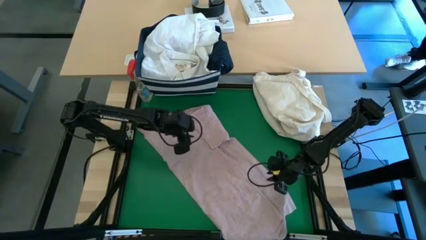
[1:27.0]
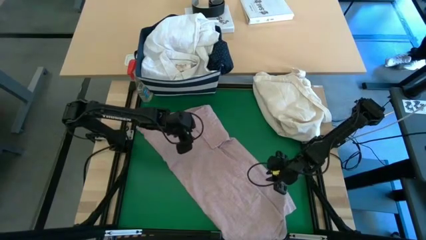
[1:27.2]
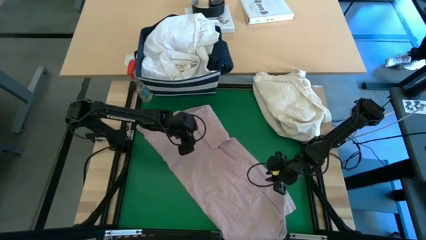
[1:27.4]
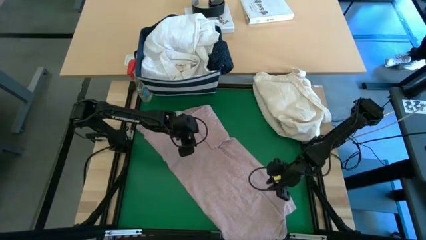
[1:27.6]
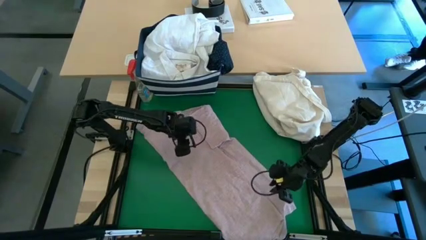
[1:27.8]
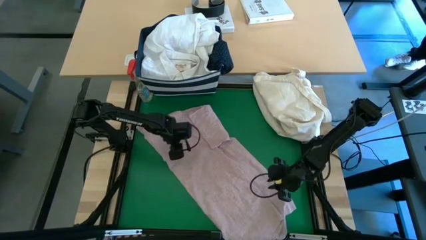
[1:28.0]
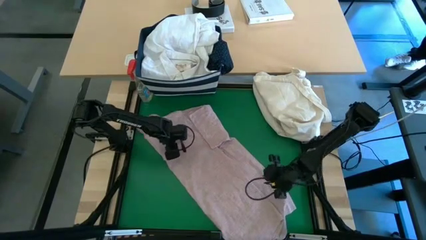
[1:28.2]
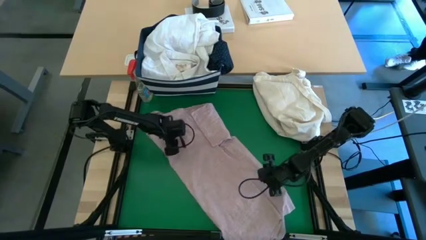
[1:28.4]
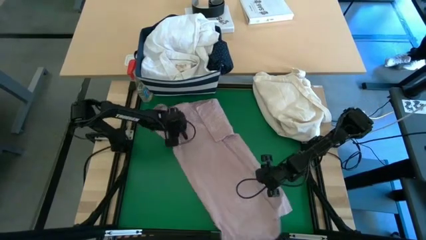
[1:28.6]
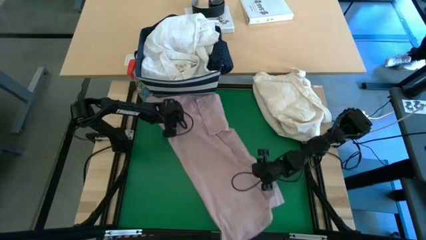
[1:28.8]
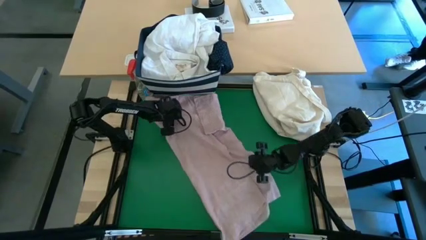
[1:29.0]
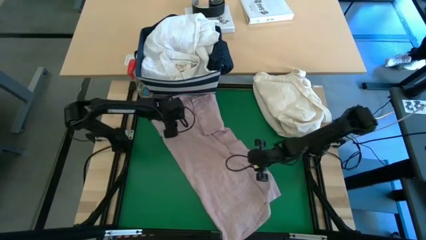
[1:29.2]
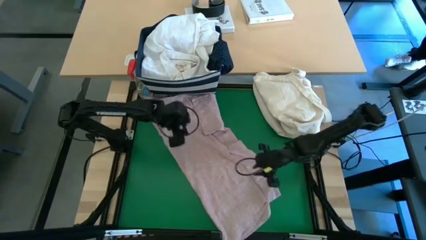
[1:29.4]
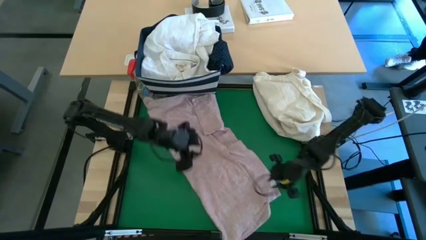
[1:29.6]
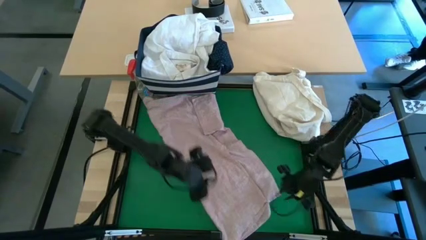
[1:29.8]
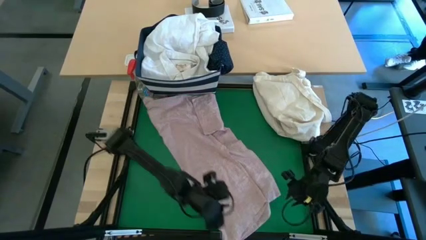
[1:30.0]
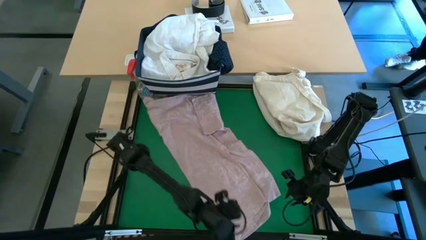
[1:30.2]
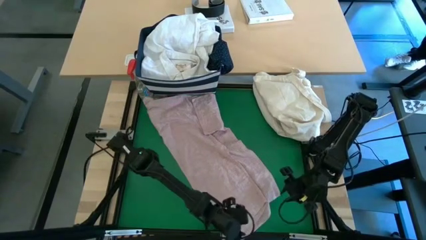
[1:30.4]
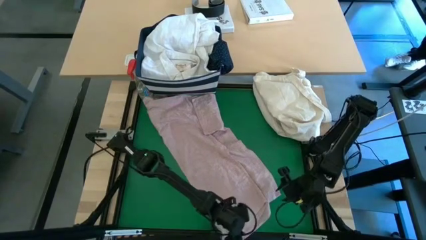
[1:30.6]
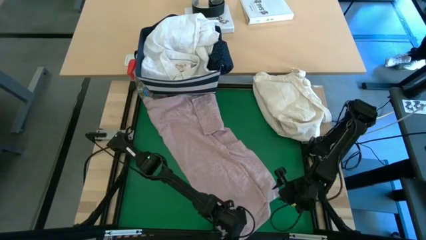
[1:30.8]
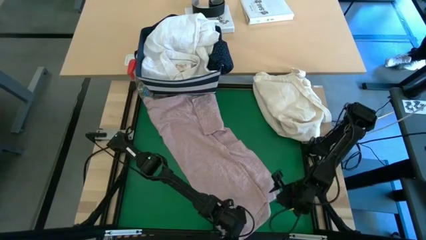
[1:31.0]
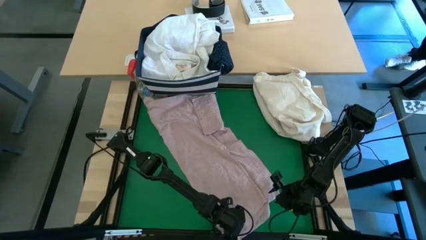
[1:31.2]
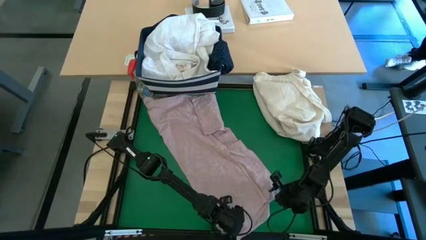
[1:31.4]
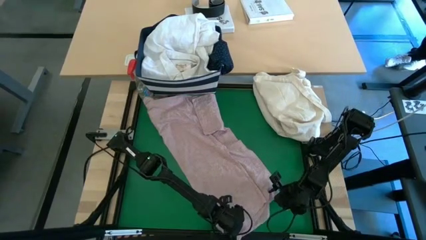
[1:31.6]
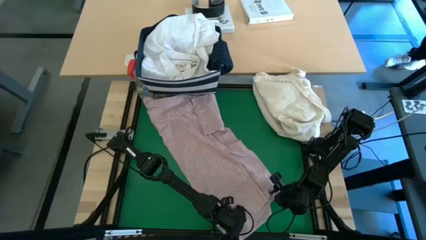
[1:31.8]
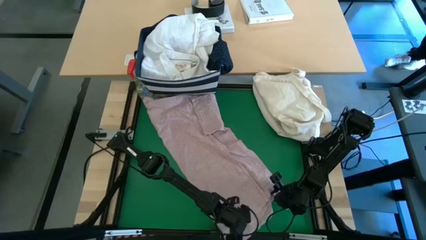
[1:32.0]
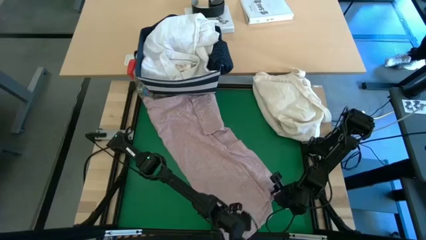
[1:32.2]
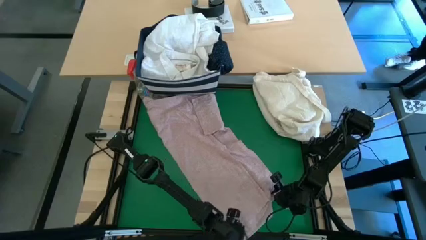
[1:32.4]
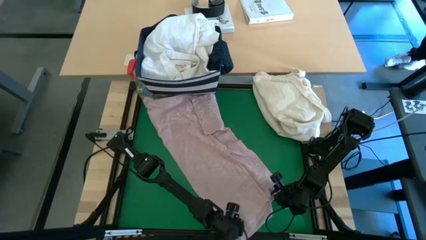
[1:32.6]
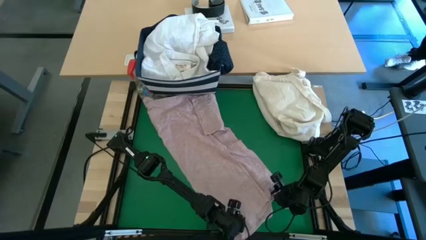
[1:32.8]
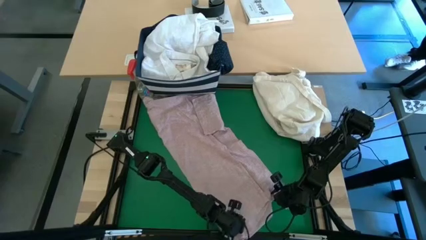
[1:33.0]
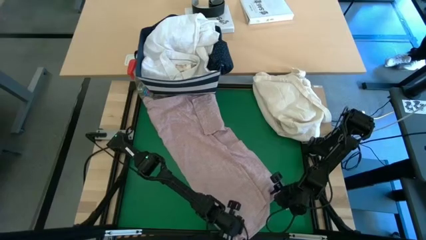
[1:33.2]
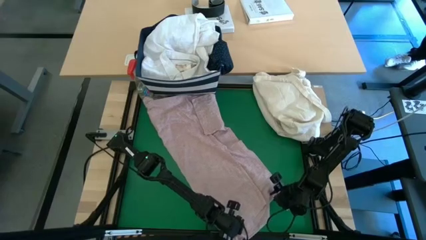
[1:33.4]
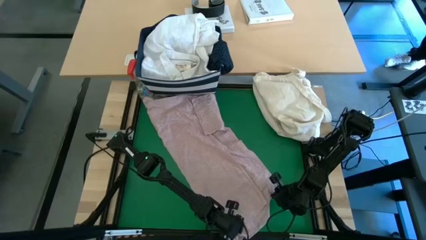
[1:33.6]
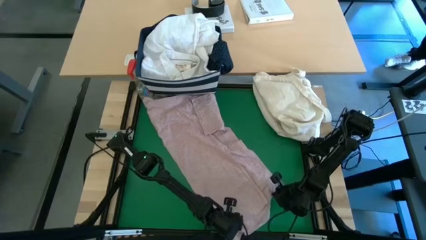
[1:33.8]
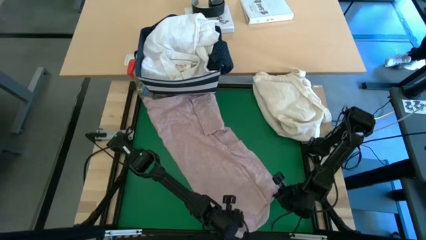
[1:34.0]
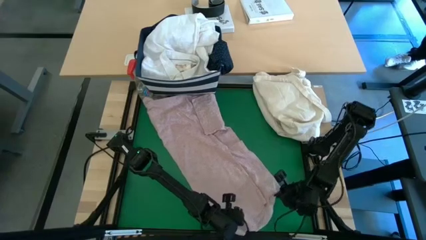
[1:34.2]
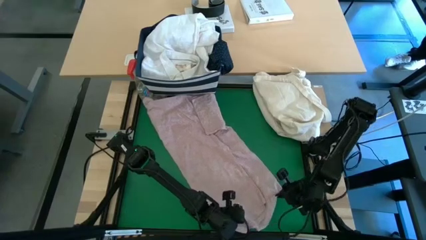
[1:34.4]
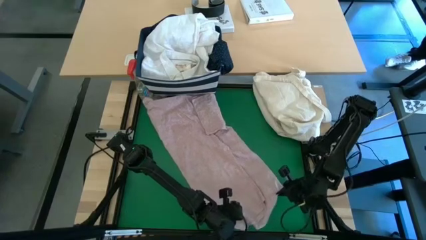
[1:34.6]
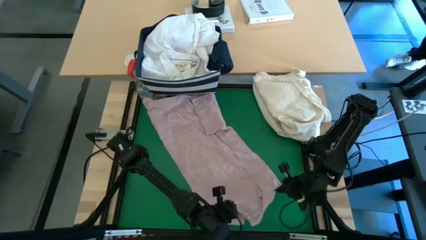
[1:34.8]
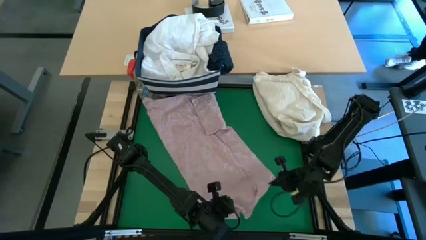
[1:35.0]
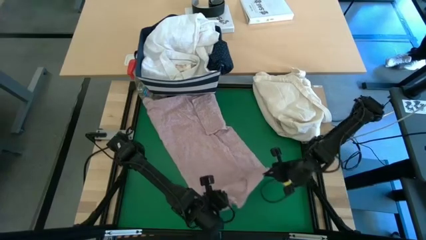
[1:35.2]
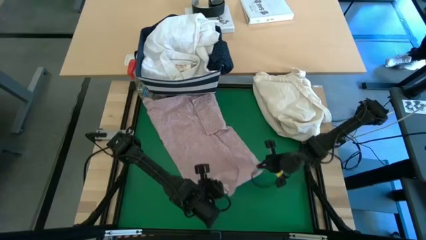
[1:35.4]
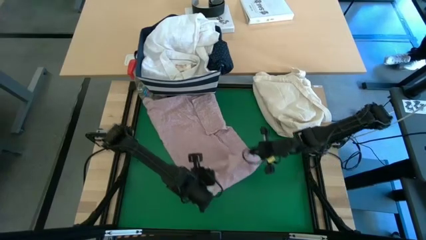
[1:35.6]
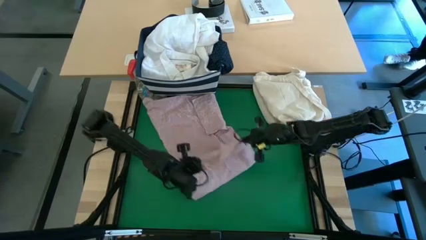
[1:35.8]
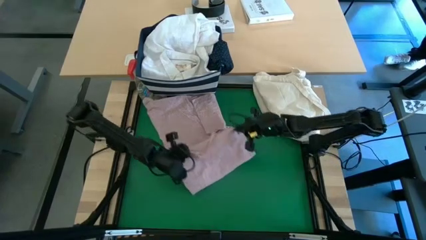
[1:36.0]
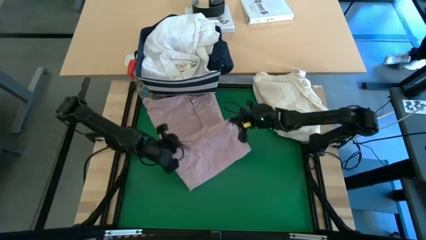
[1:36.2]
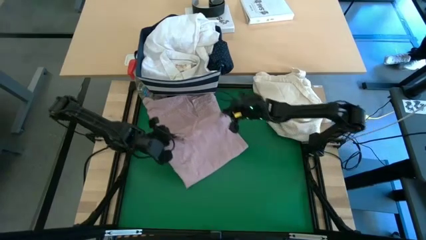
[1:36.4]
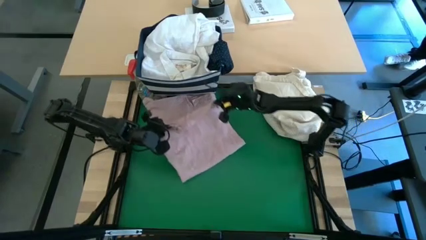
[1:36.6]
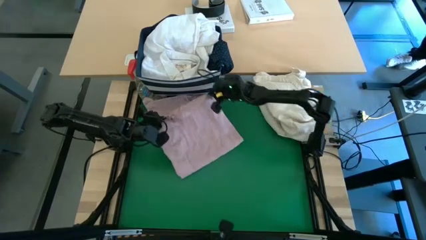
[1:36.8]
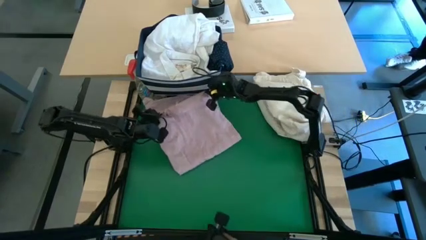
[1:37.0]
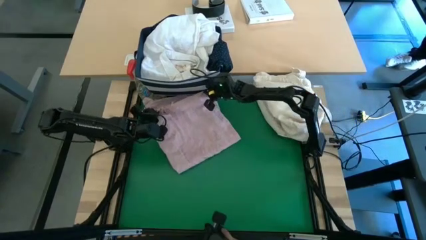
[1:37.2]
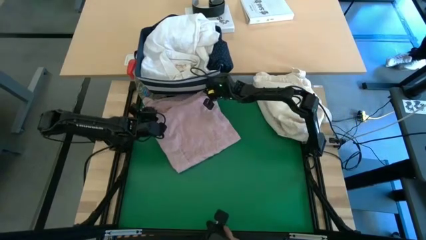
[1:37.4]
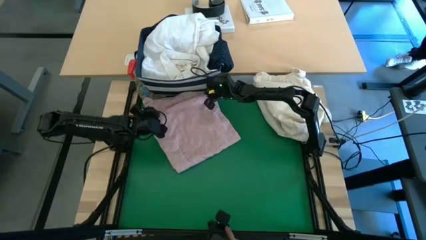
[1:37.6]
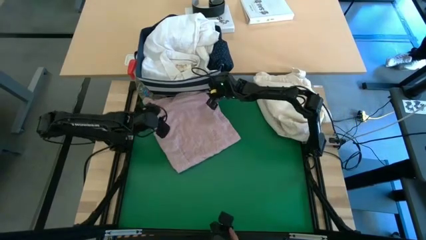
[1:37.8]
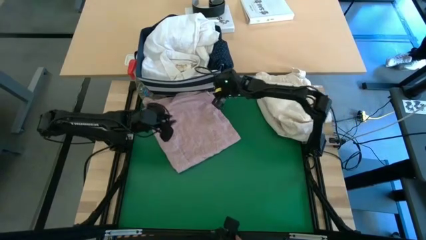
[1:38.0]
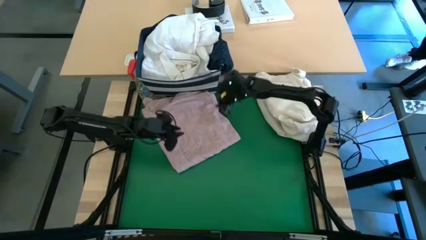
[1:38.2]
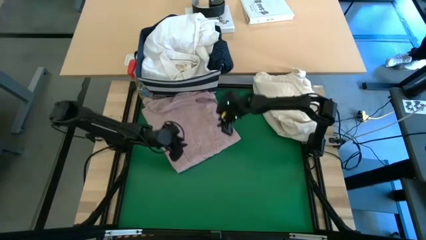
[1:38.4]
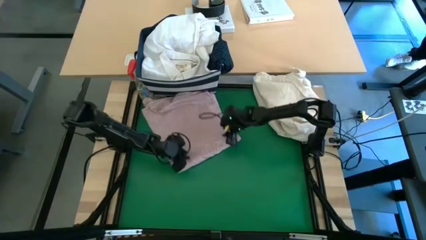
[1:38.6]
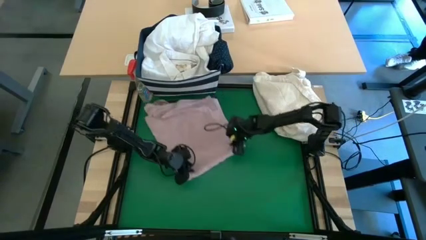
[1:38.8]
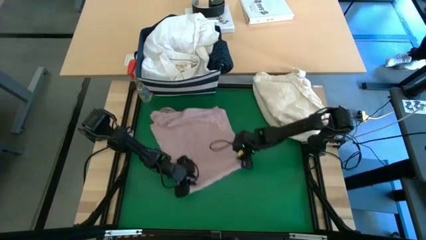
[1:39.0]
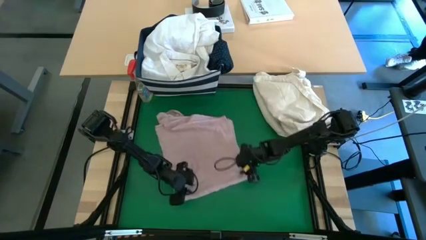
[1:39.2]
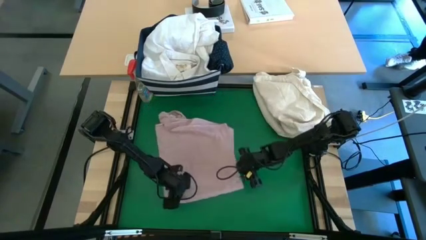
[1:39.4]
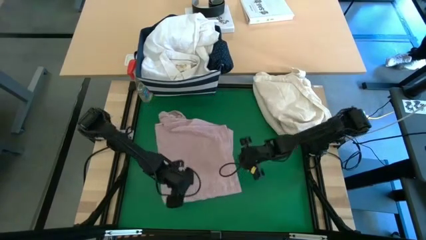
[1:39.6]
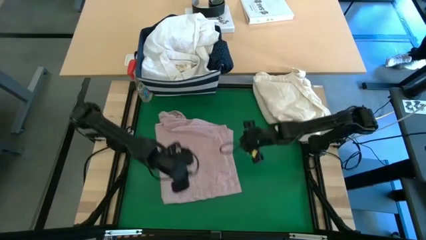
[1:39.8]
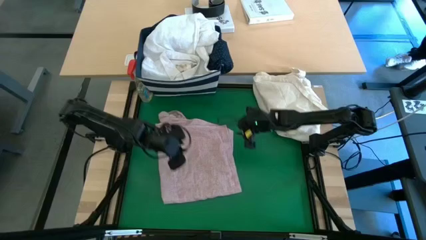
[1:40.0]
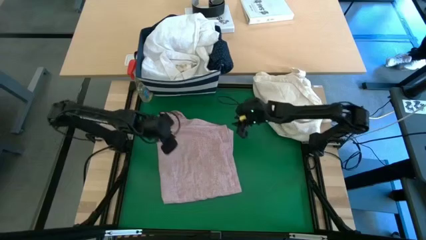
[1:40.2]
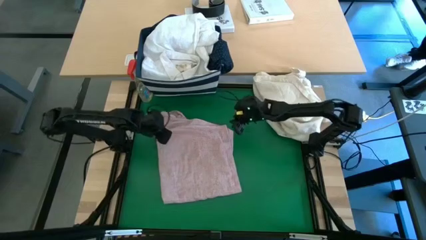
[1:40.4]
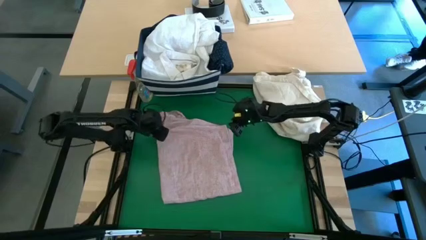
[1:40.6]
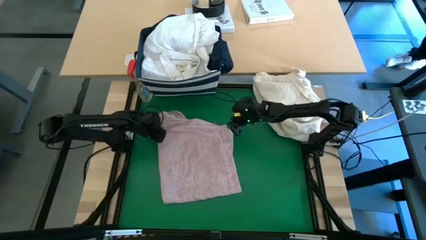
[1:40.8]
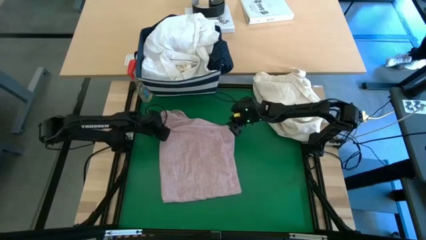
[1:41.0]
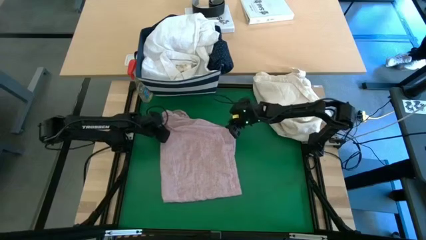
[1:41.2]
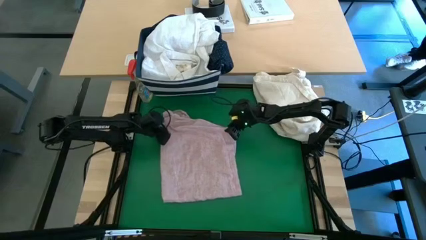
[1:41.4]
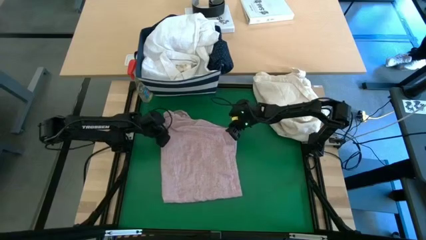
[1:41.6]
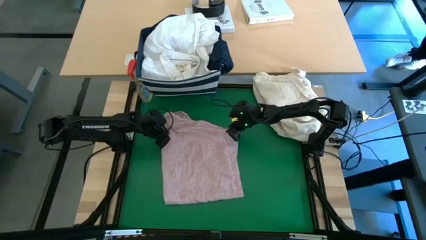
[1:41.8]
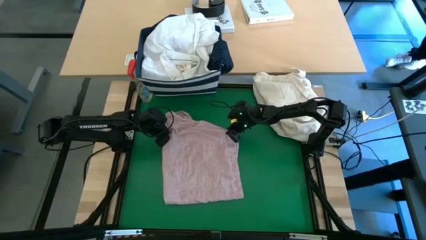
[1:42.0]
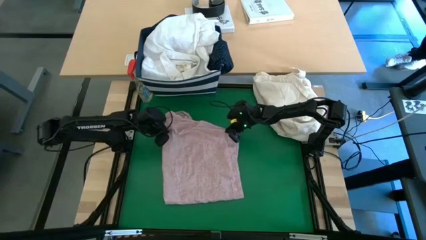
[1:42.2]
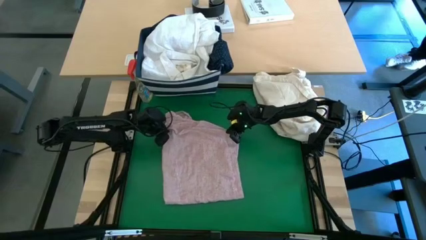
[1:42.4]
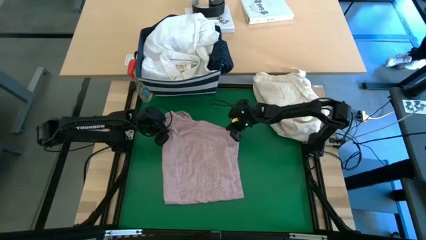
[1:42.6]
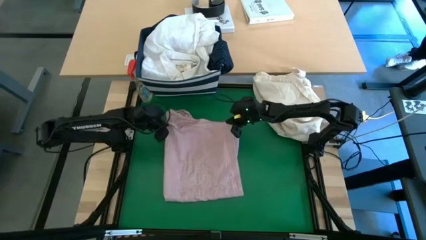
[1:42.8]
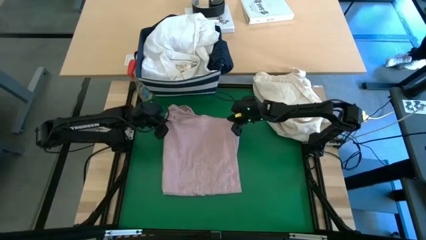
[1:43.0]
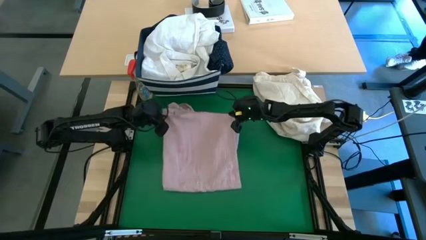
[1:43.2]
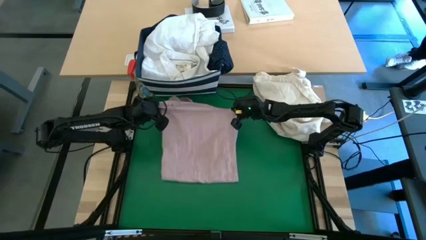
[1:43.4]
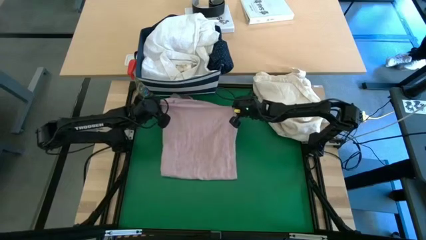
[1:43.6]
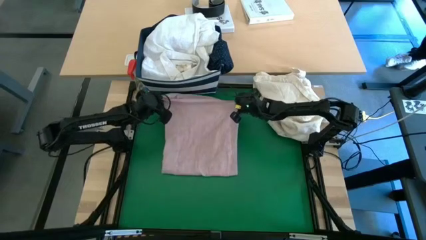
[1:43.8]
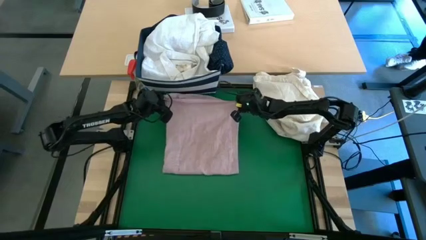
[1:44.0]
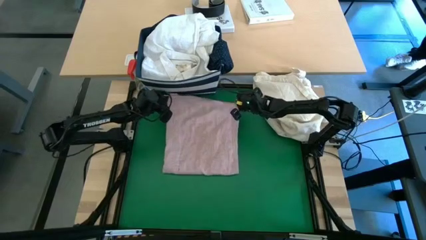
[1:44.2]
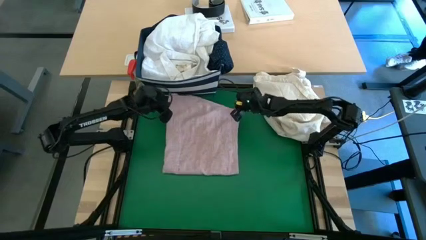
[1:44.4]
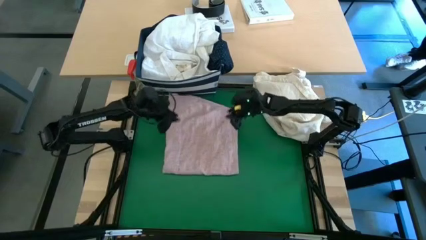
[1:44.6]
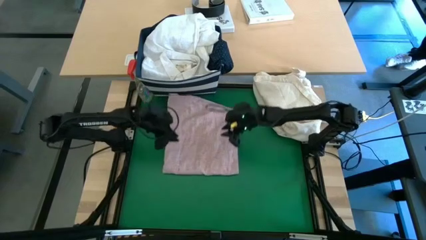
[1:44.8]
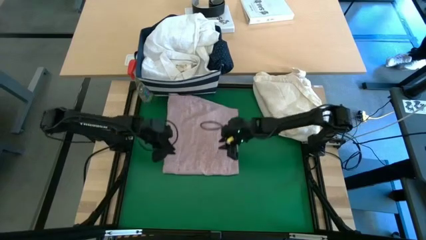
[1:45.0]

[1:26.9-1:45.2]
Task: Fold laundry
Fold the red polo
